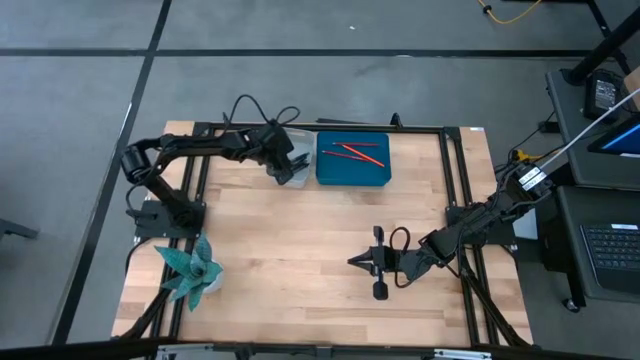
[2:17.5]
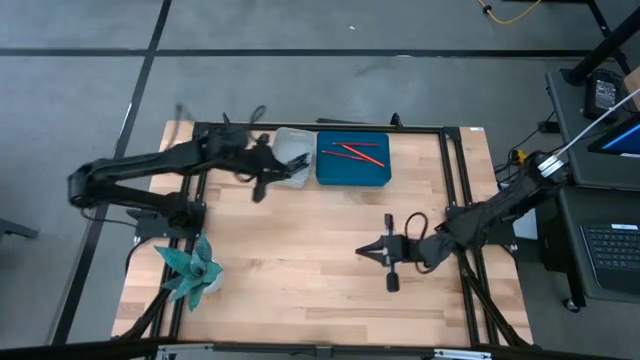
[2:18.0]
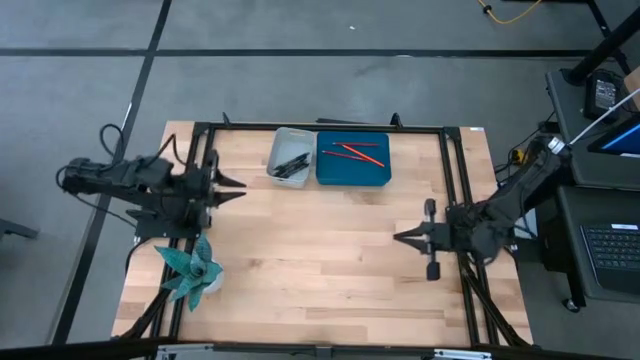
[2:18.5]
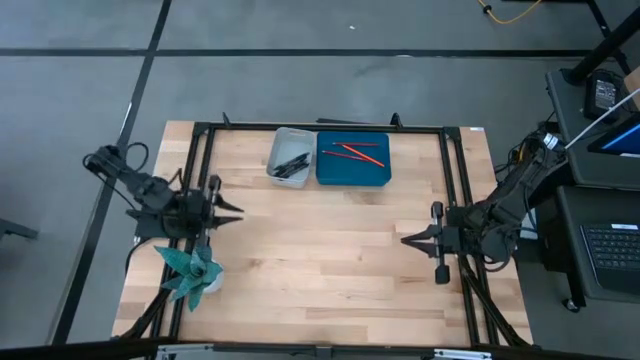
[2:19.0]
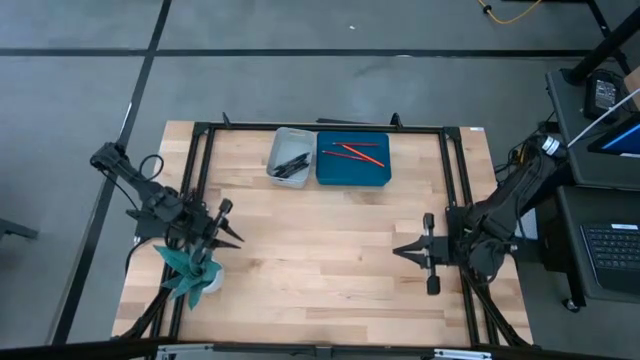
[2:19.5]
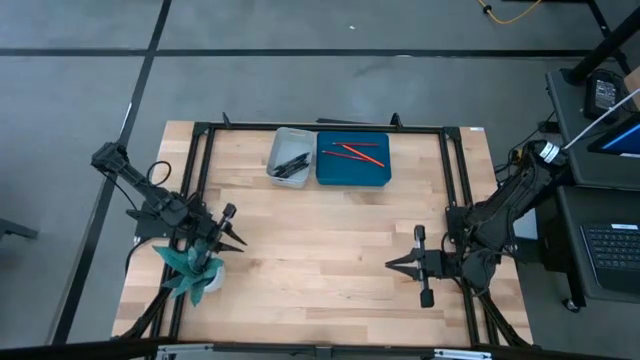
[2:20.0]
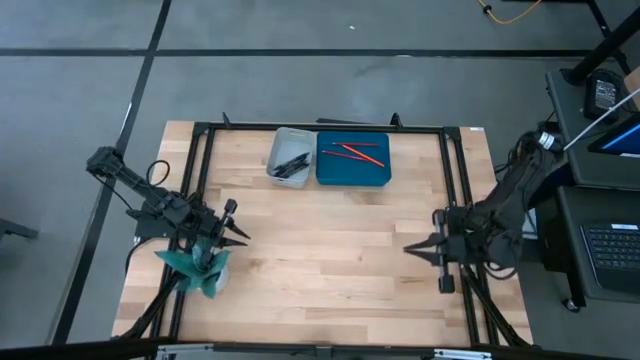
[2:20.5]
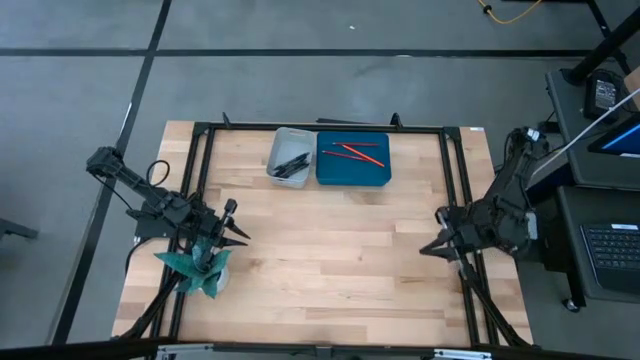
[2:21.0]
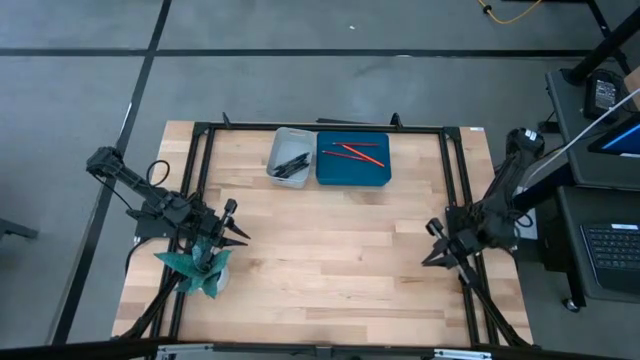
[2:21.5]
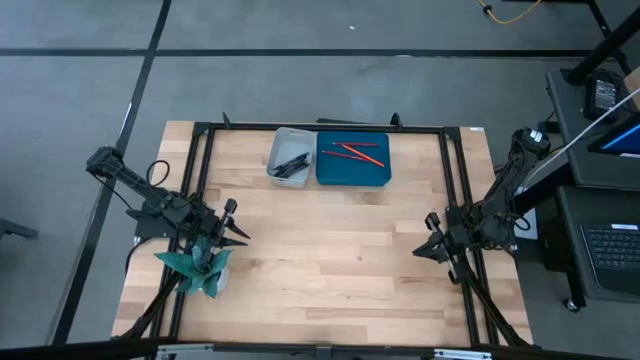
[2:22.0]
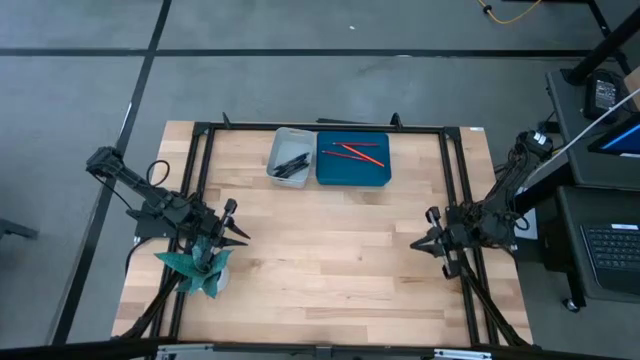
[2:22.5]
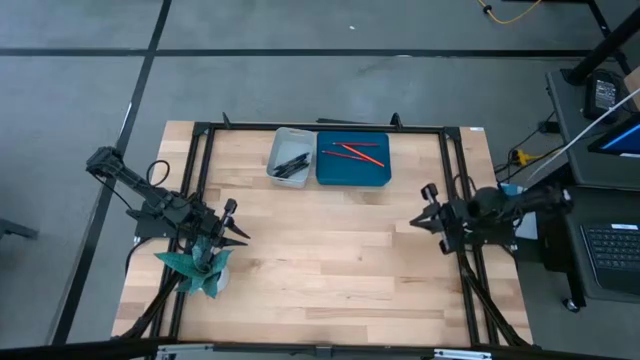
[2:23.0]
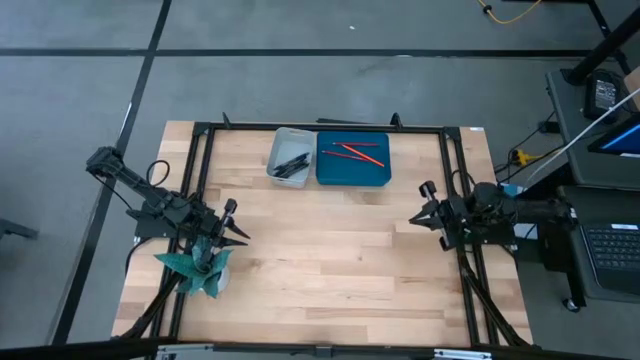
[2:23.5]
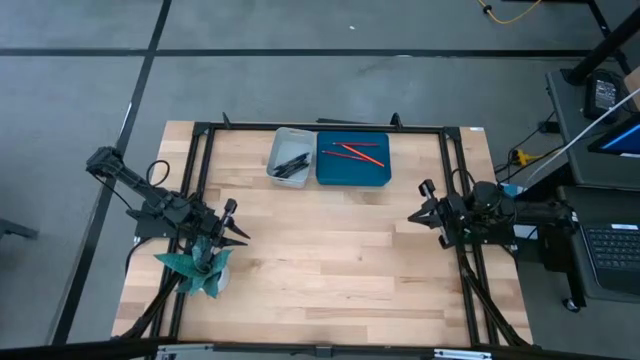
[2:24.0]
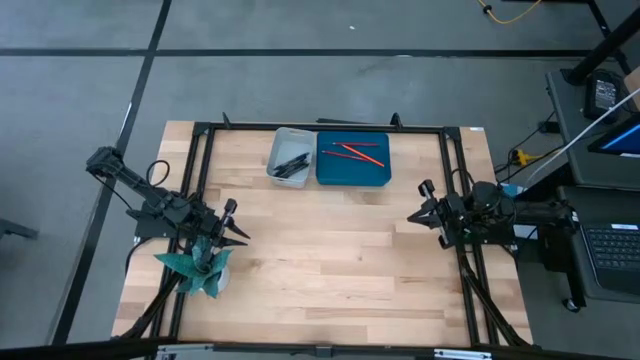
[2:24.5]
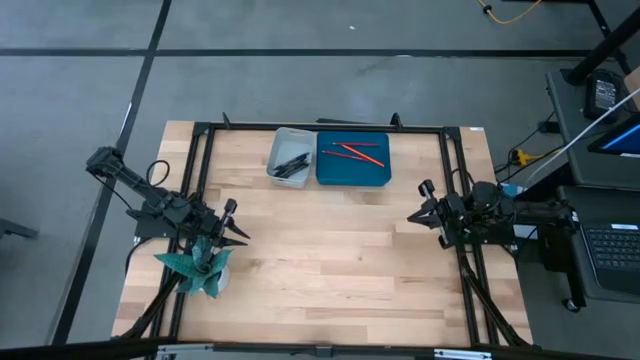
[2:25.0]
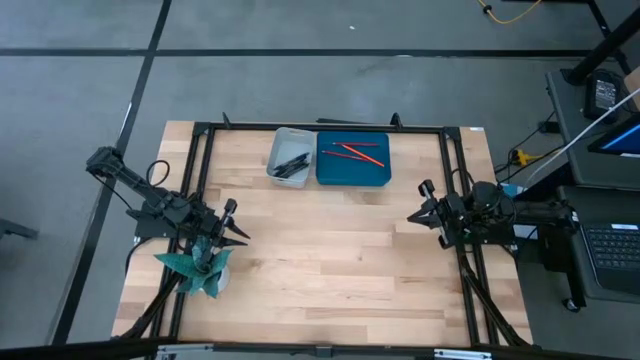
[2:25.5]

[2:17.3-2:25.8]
Task: Sort pens & pencils
Return to Home Position

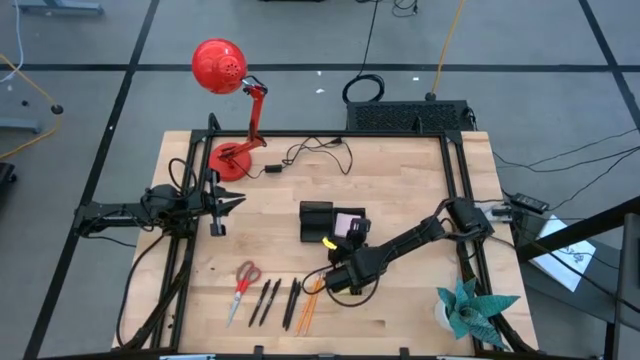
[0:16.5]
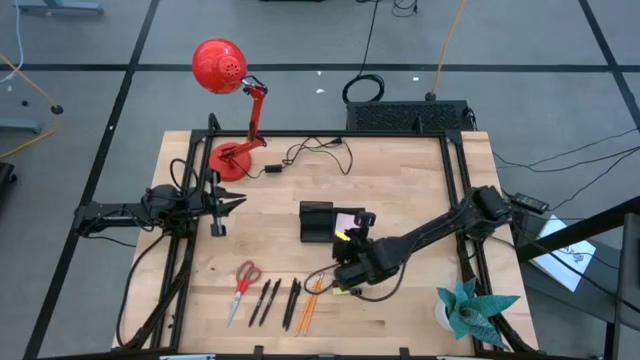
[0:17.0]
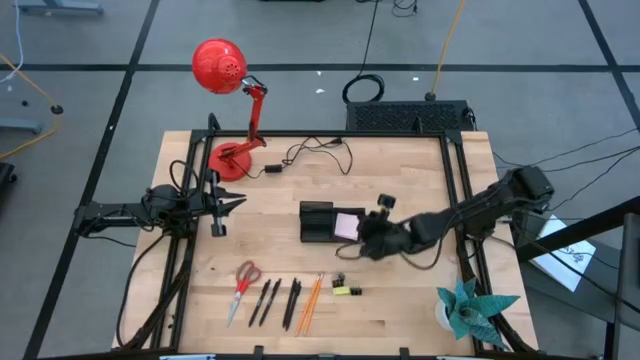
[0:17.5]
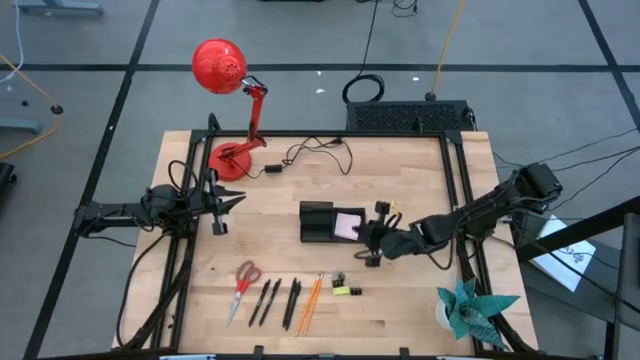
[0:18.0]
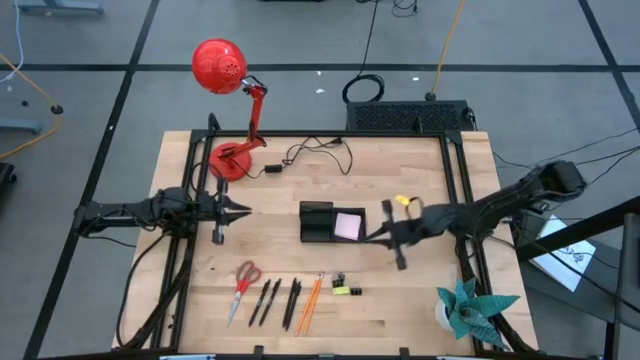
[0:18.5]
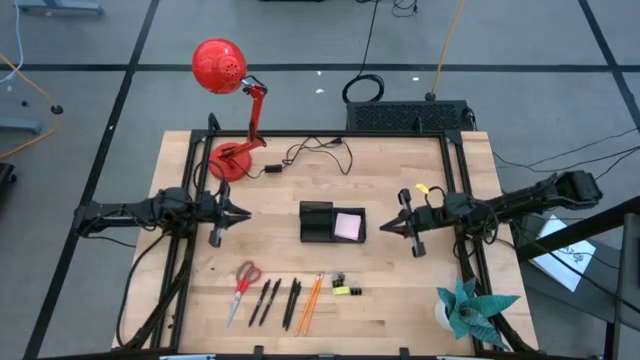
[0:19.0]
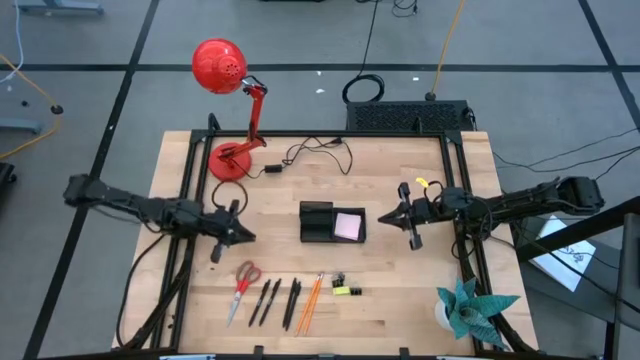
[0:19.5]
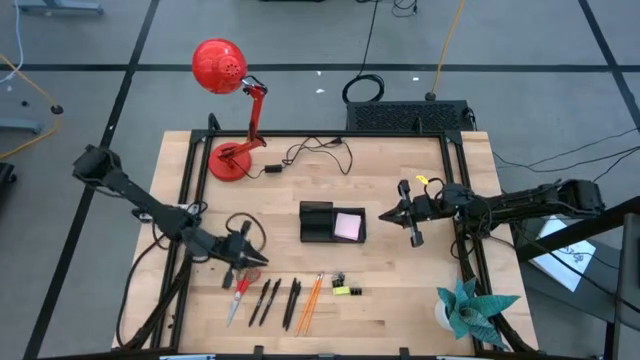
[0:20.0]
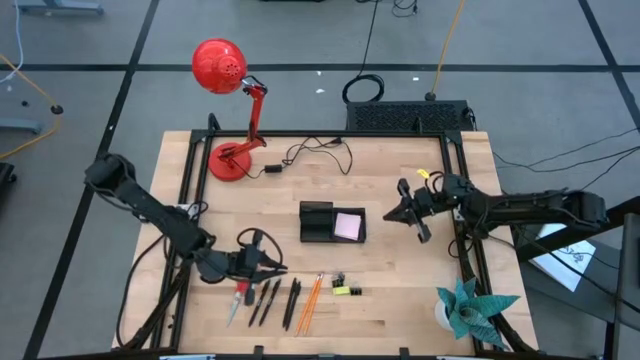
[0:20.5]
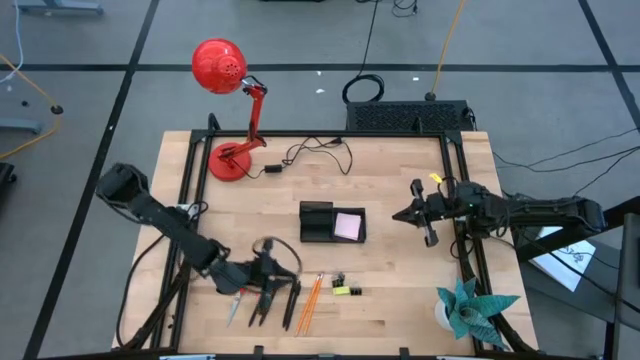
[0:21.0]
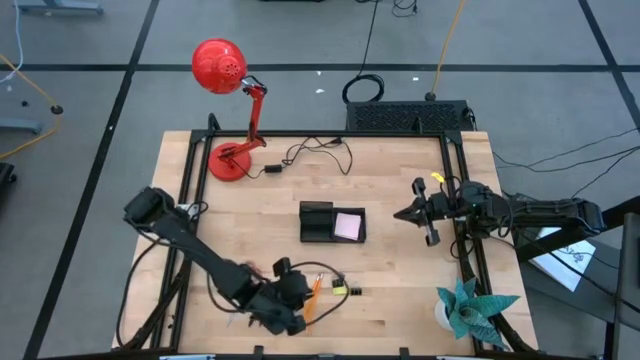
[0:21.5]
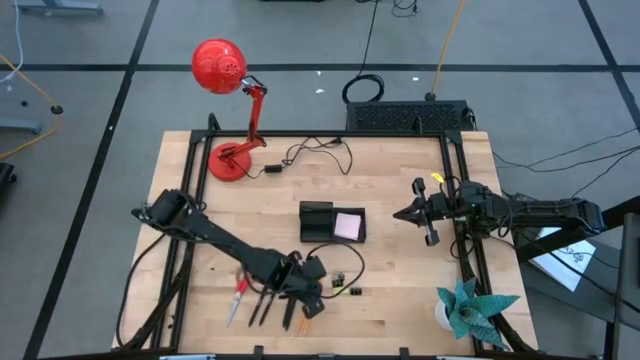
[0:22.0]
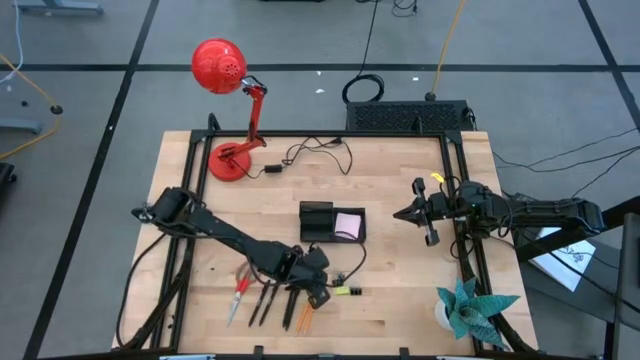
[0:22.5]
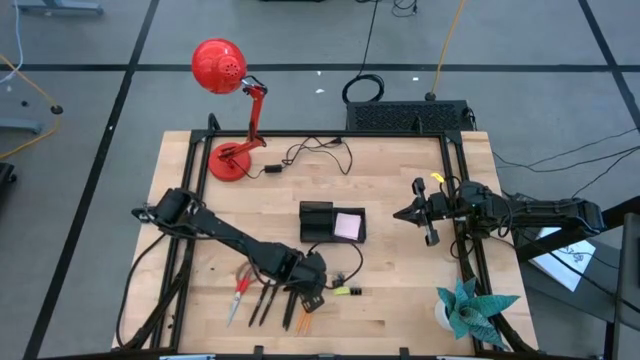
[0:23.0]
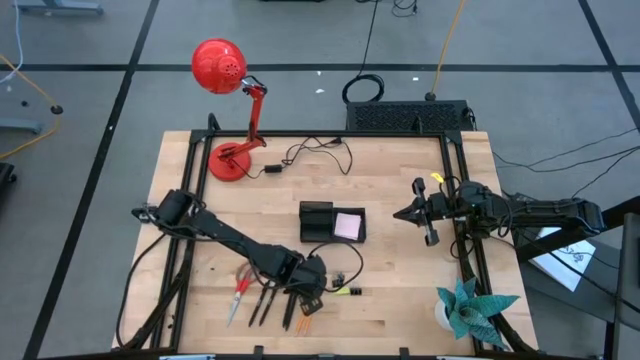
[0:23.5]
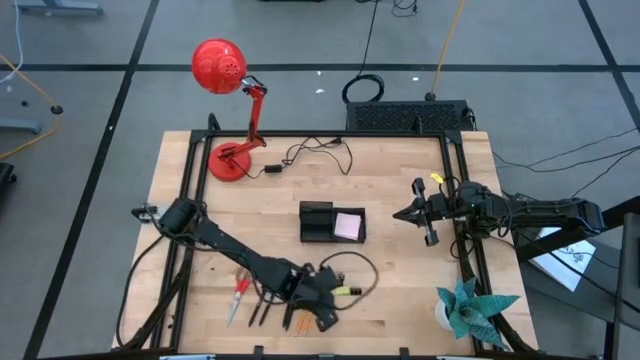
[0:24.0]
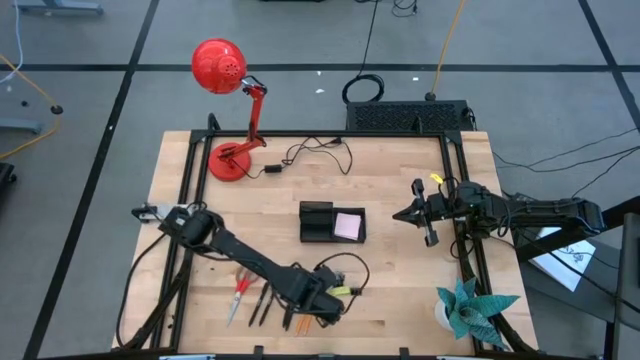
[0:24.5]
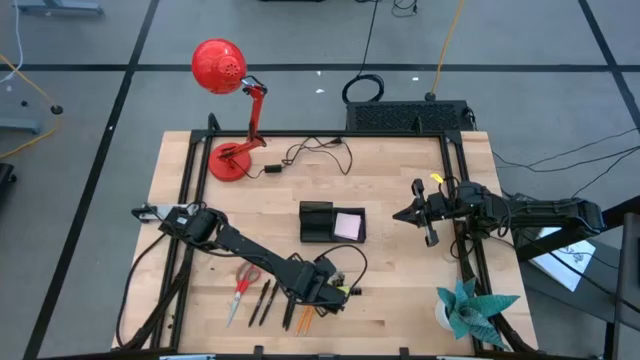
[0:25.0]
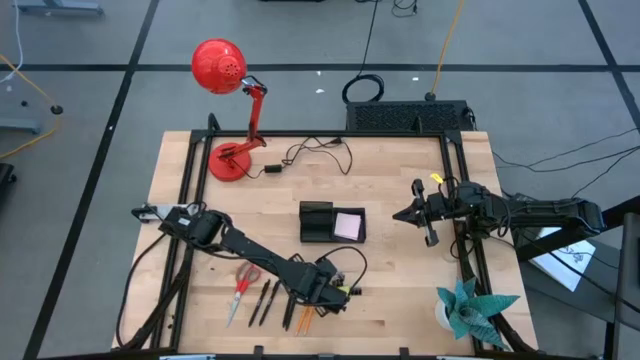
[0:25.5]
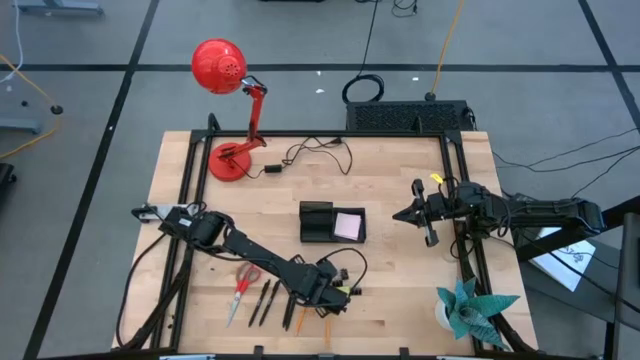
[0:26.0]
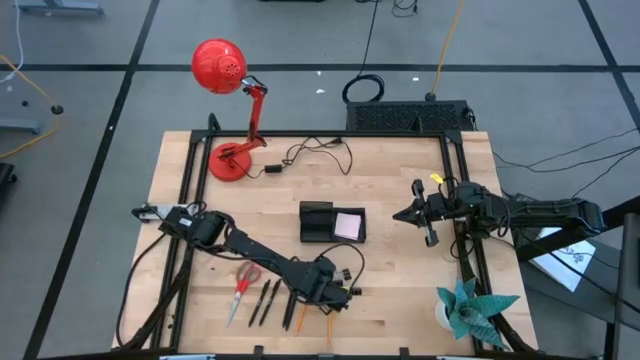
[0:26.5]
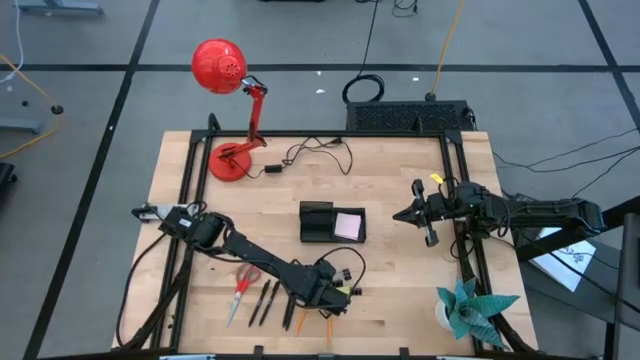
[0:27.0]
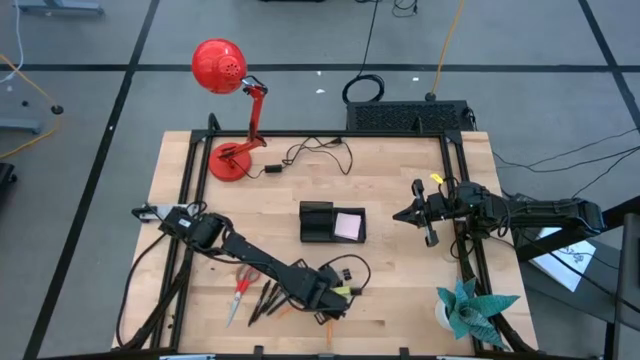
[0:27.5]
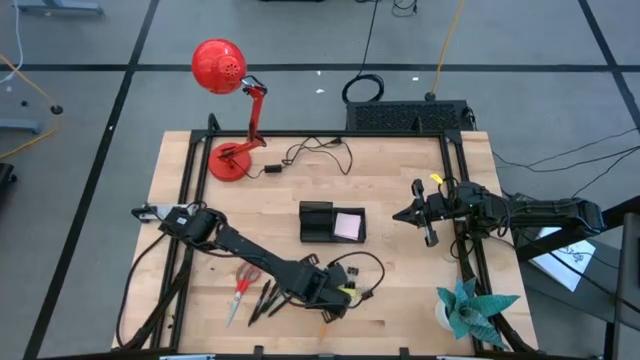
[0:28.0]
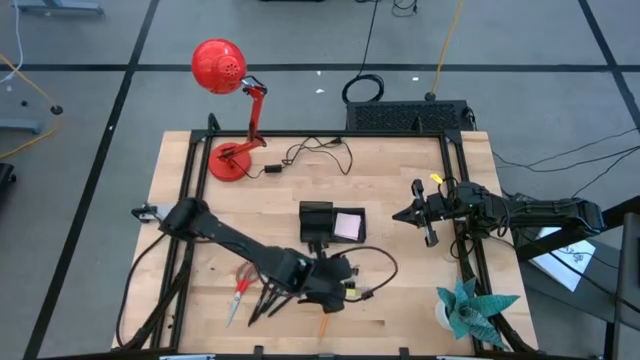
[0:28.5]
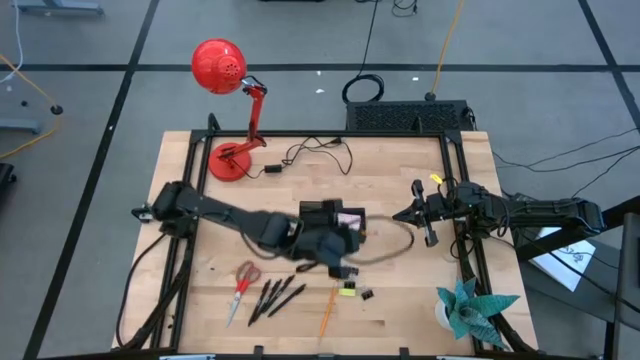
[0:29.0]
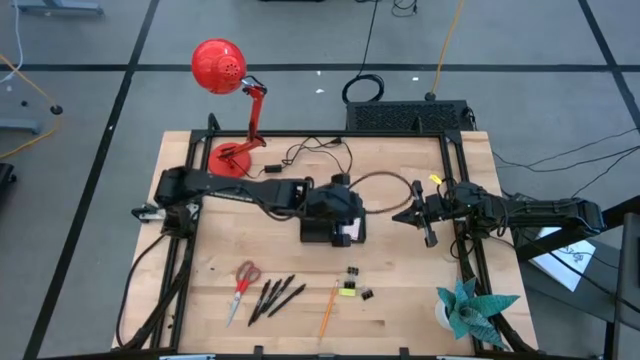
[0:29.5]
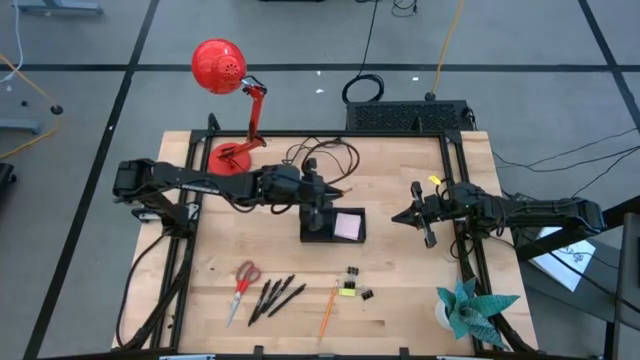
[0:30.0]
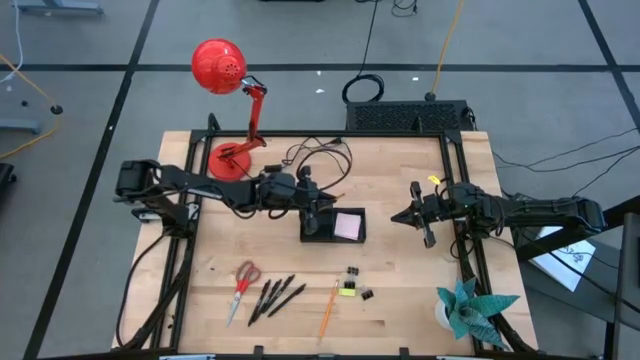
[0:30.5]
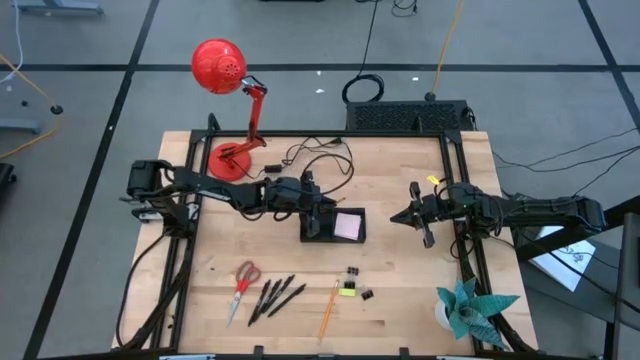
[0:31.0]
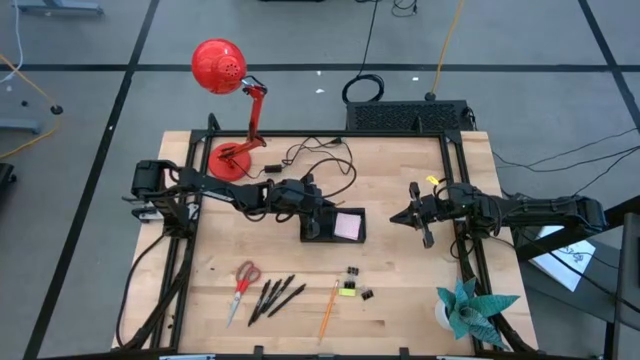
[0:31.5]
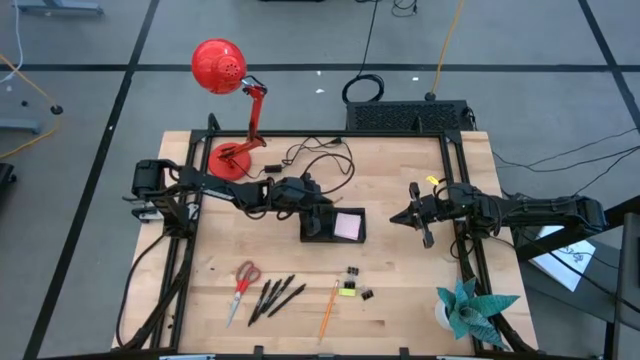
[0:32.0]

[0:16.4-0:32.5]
Task: Pick and place office supplies into organizer
Put the left pencil into the desk organizer
